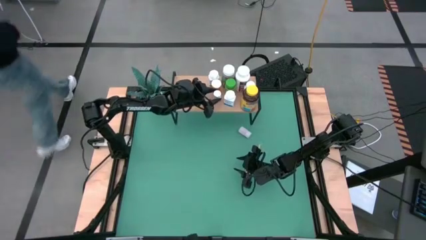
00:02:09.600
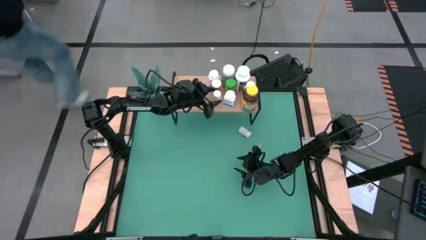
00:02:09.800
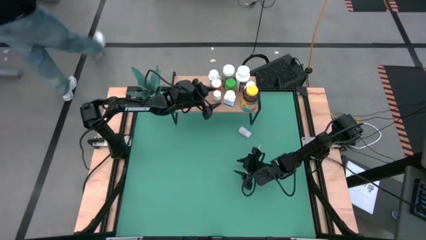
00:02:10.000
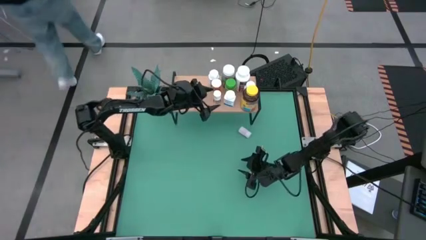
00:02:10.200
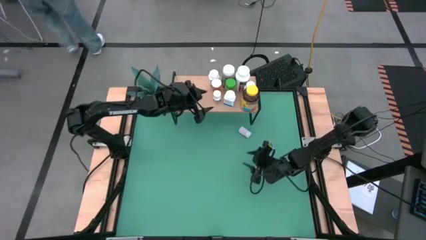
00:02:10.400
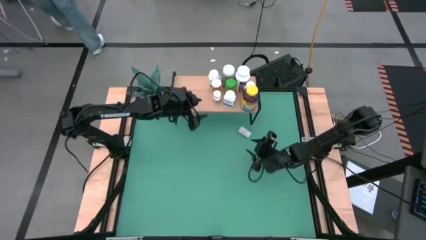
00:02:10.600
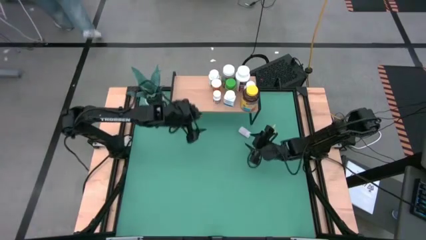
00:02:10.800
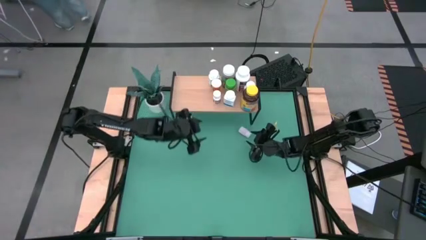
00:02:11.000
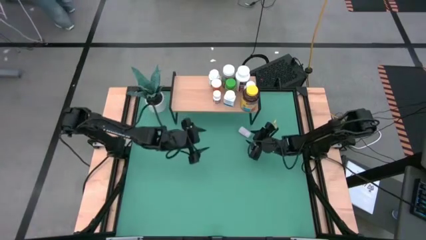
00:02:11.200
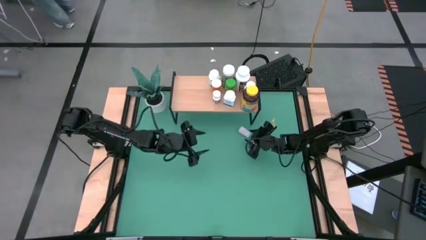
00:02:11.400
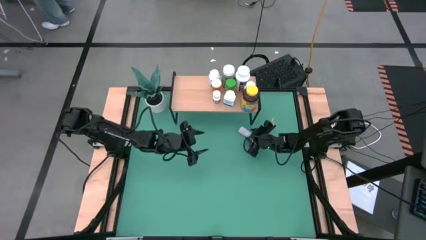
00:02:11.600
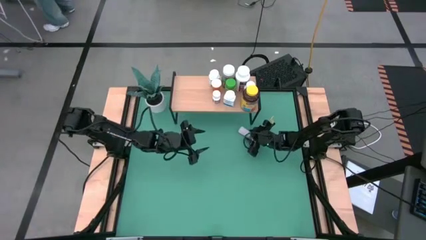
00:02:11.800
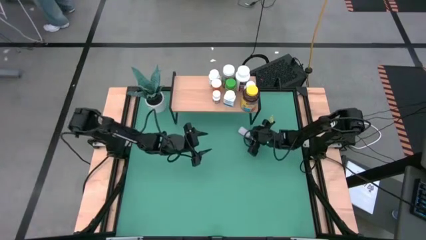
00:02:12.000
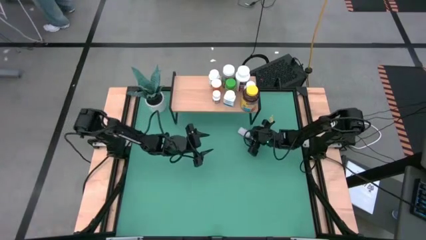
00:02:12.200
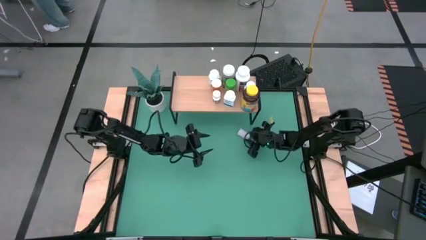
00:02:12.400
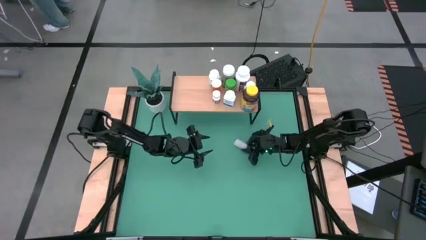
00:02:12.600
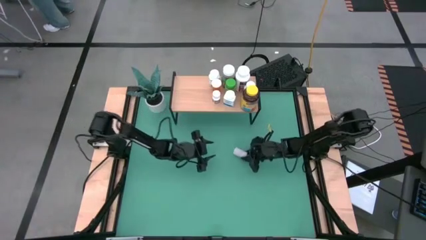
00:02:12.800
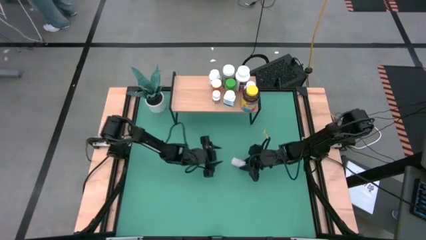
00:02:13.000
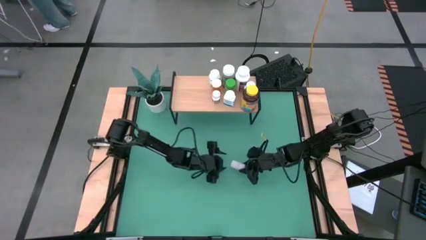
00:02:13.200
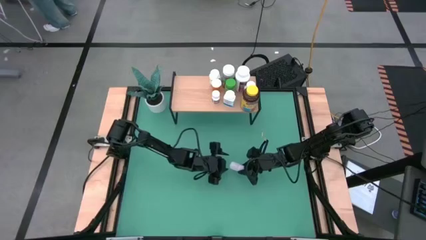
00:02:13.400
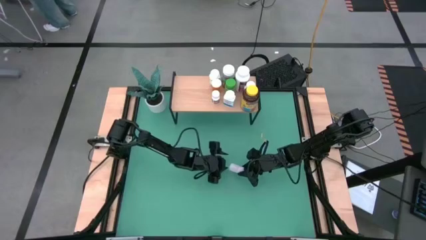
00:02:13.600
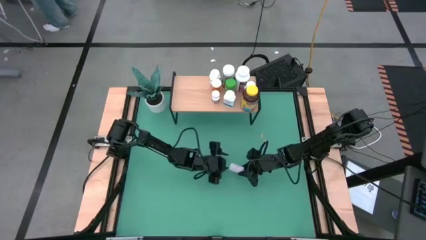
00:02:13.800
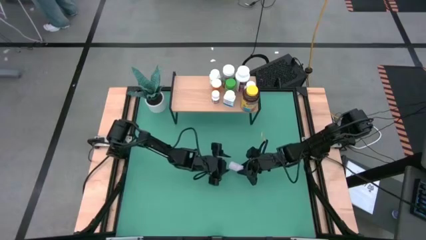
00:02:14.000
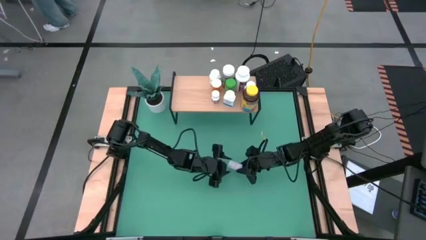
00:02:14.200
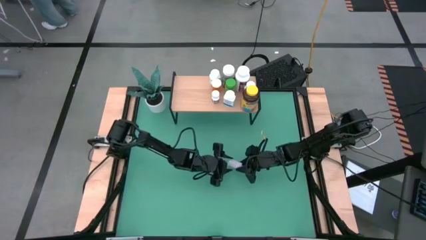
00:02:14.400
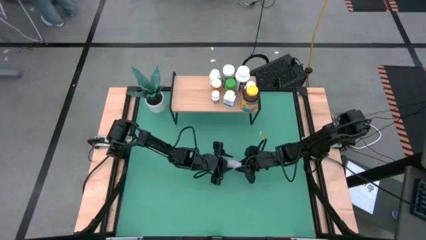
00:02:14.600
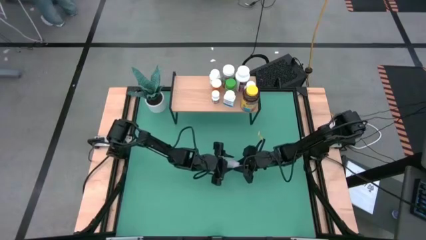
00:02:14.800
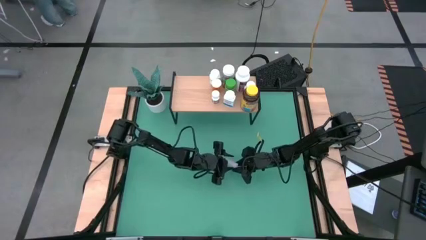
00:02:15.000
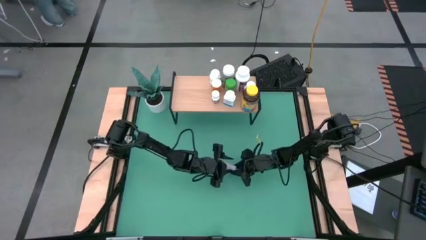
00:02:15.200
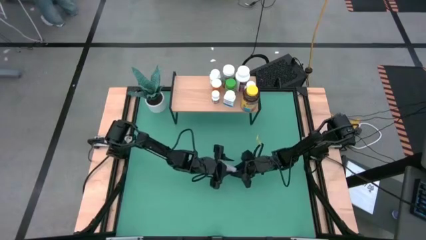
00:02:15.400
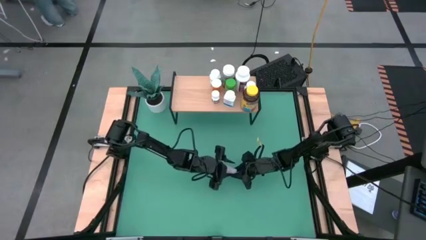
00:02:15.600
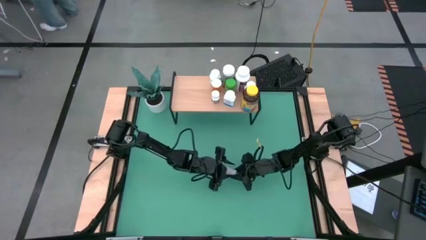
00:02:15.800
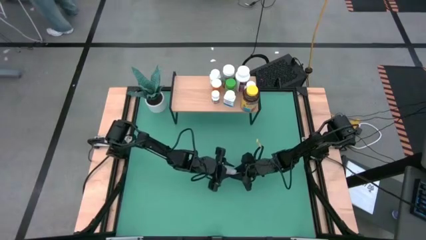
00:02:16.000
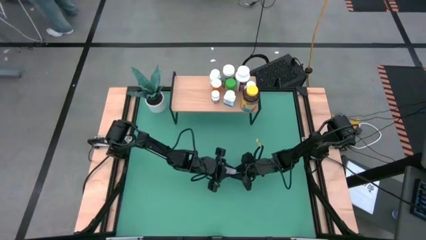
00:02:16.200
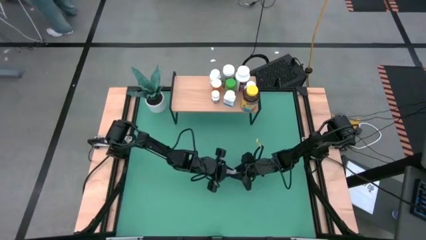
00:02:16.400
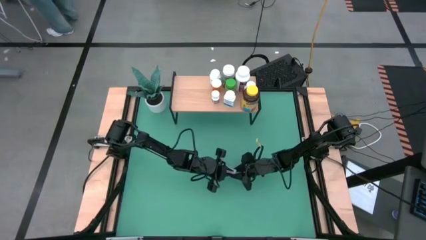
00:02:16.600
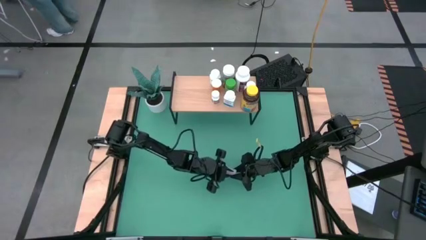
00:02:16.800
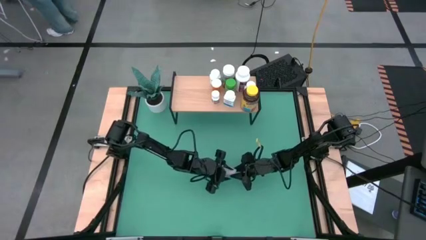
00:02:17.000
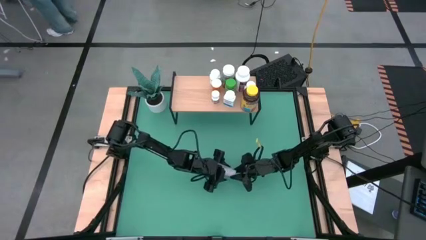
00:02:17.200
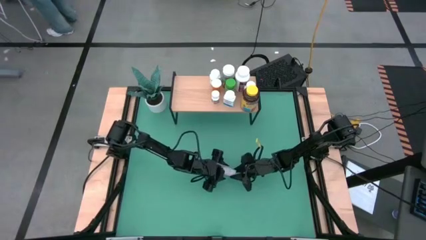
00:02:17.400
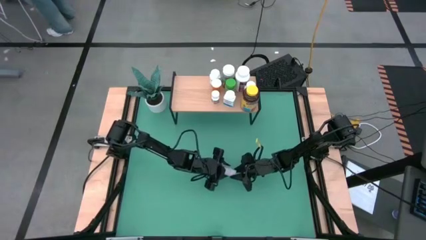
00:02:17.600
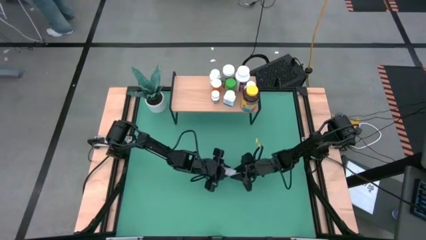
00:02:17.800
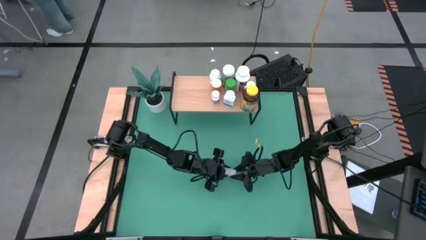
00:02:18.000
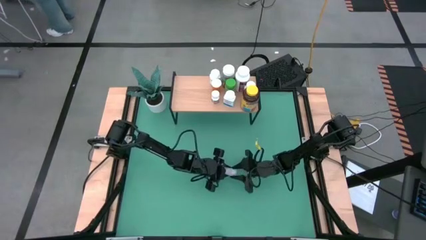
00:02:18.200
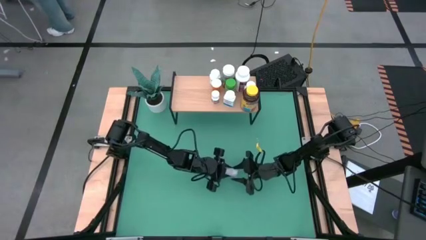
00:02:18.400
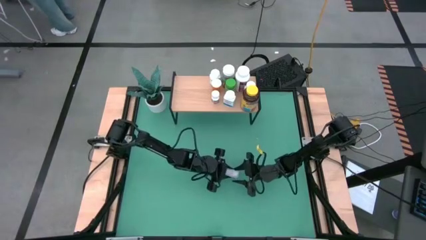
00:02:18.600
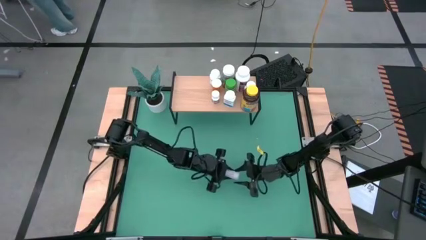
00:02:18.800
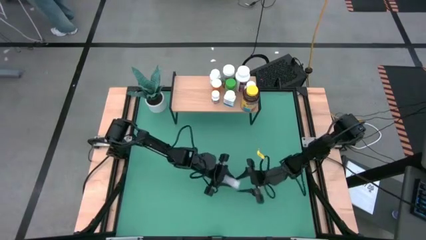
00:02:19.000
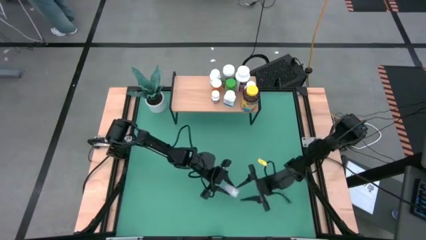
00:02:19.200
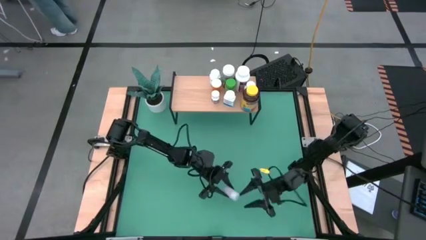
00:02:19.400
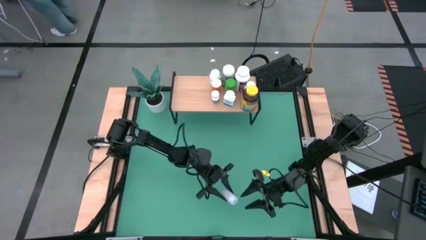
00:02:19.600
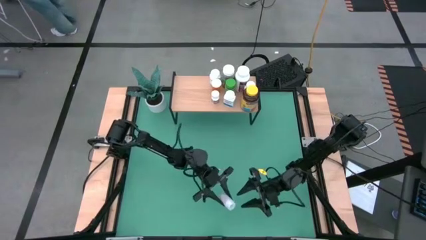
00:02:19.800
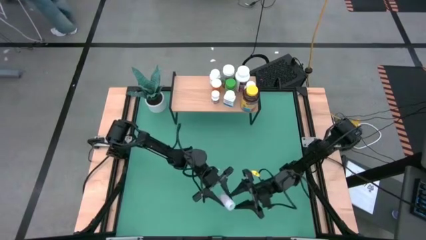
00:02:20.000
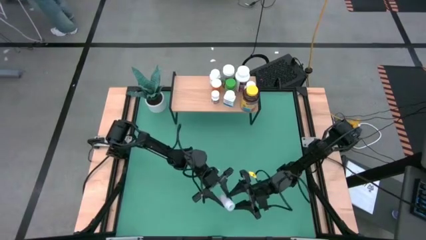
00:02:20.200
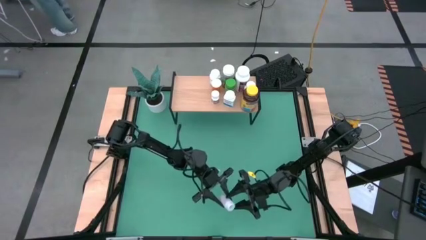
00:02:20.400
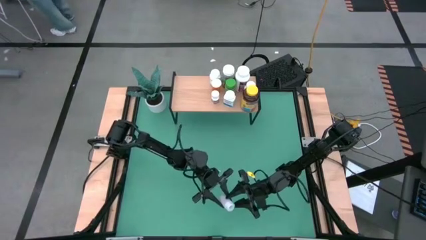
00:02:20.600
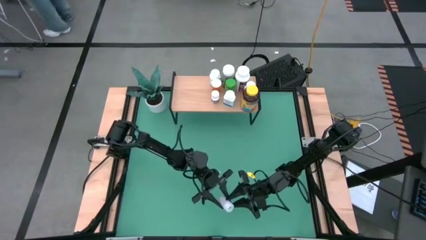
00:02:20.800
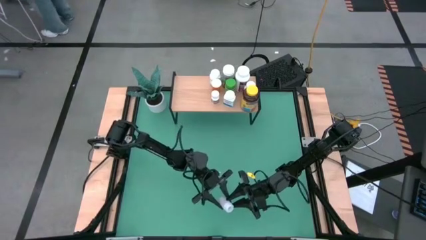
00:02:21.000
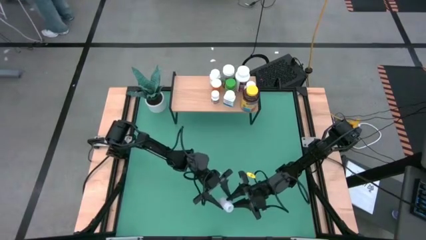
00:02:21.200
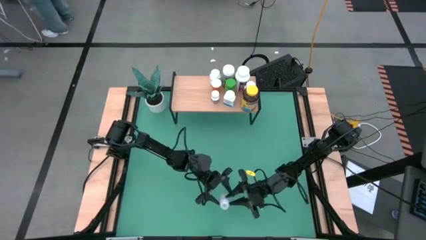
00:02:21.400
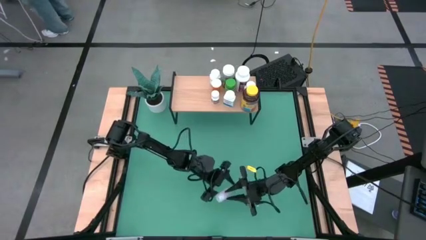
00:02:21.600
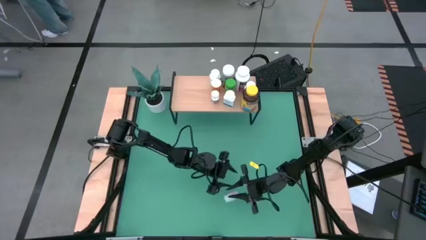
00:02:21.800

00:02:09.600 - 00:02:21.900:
Task: Pick and place medicine bottles onto shelf by color
Put the transparent pill bottle on the shelf

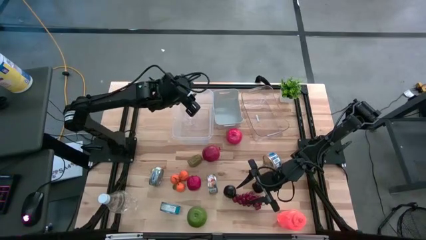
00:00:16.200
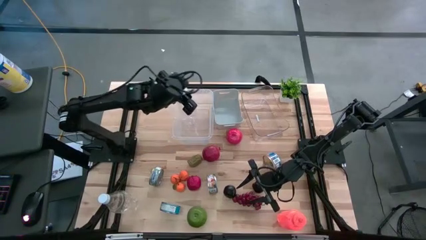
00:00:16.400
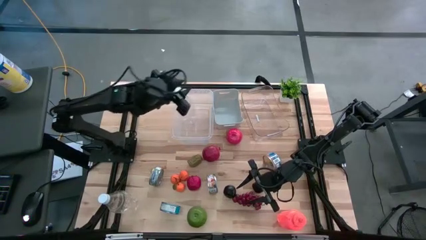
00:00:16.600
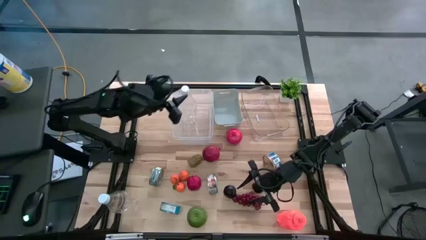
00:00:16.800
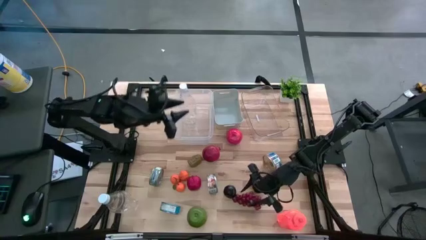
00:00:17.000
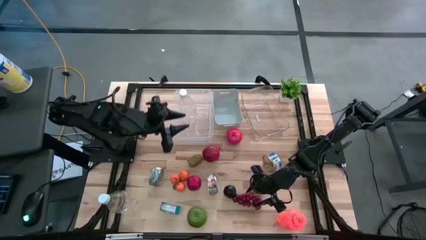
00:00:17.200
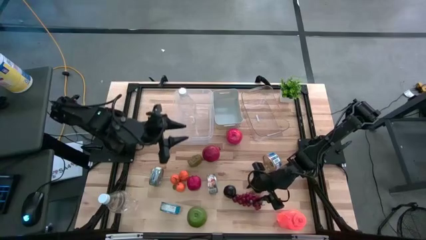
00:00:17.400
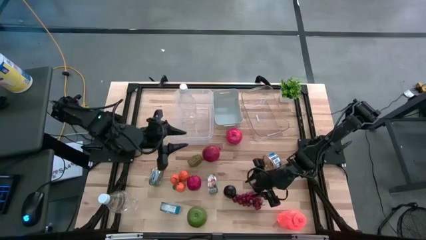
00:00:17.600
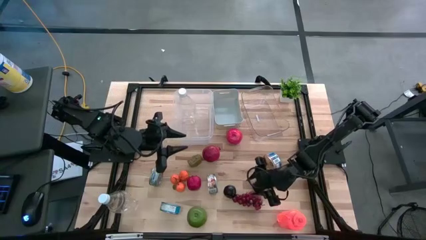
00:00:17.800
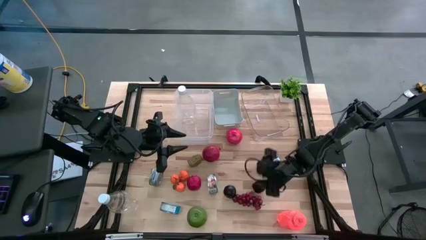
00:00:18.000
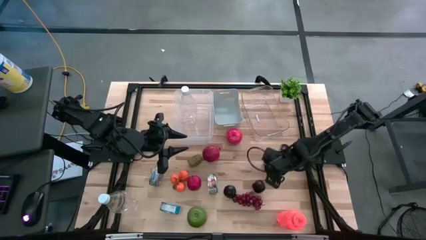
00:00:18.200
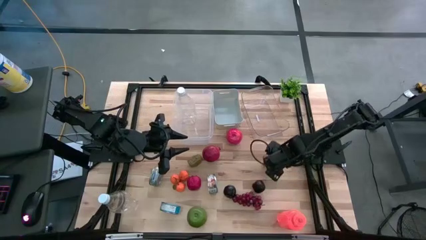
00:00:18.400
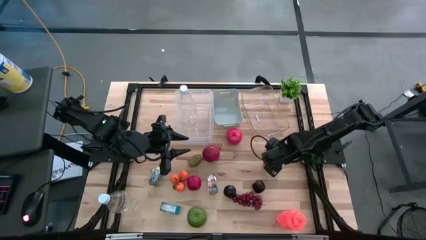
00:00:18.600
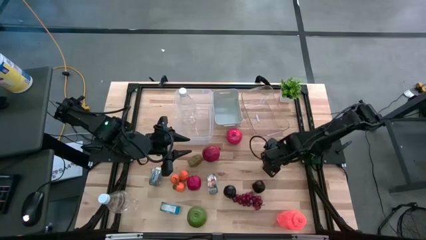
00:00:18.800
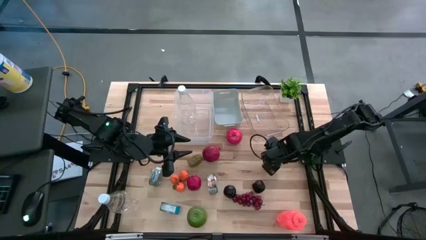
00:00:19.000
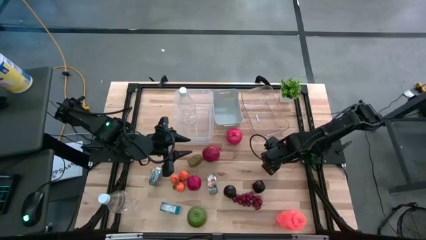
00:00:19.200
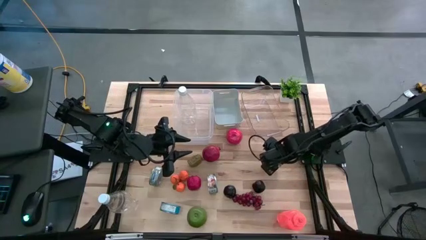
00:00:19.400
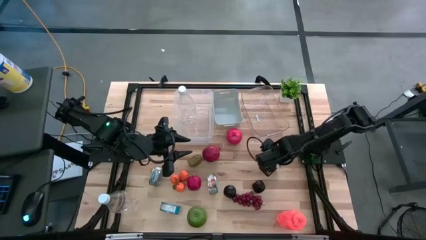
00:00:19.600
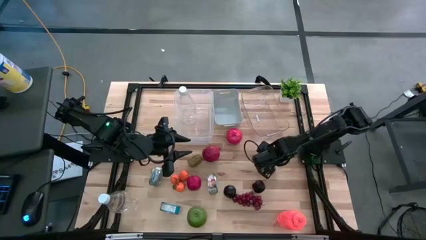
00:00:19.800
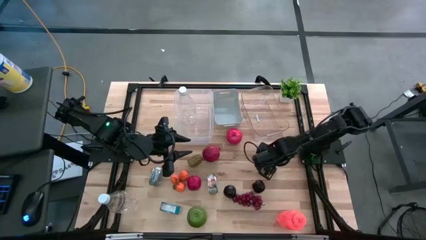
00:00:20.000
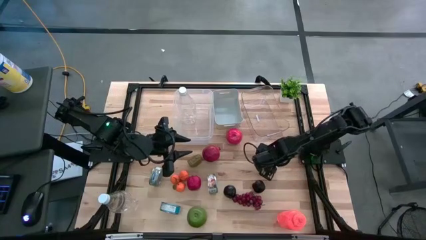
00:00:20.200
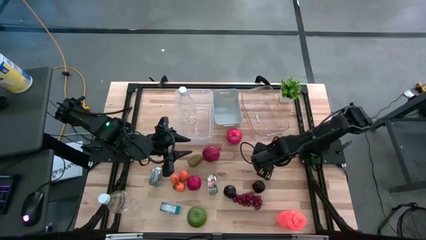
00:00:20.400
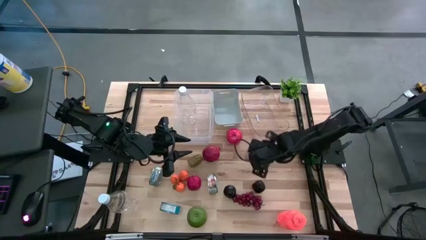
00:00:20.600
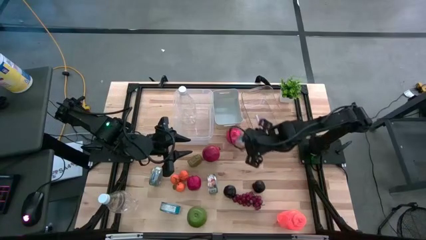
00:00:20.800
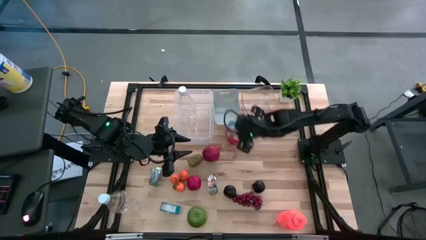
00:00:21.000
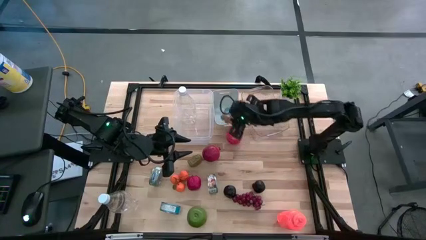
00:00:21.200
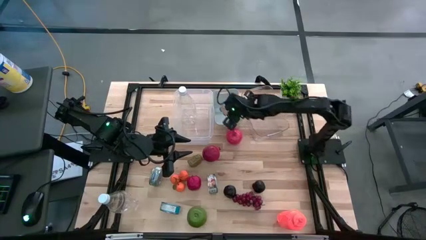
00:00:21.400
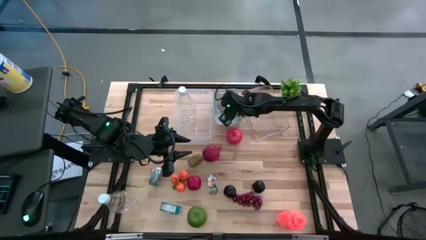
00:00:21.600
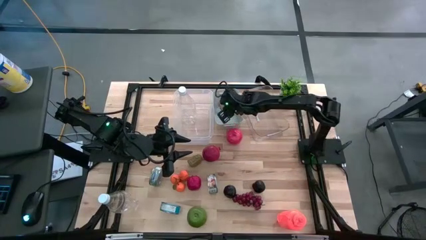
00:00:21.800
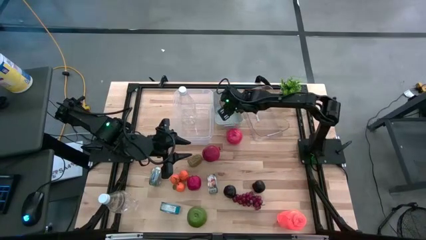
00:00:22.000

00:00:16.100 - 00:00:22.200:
Task: Pick & Place Food Item
Put the top blue canned salmon into the white bin
